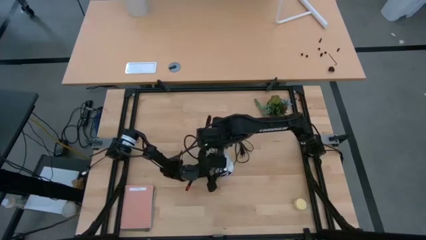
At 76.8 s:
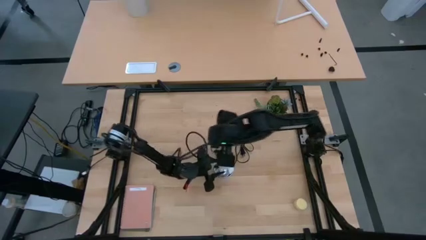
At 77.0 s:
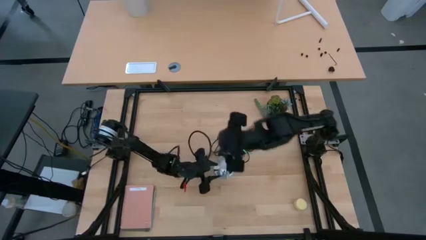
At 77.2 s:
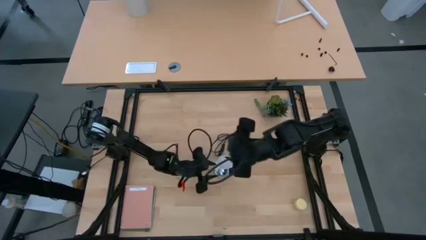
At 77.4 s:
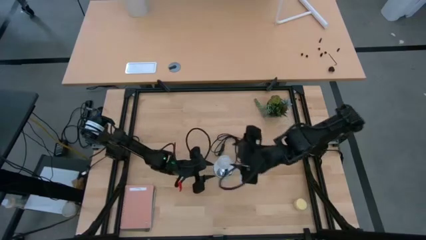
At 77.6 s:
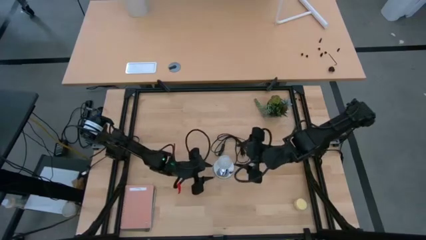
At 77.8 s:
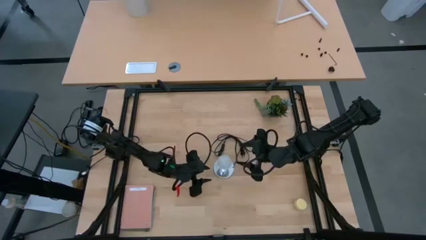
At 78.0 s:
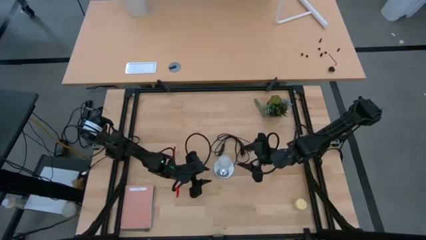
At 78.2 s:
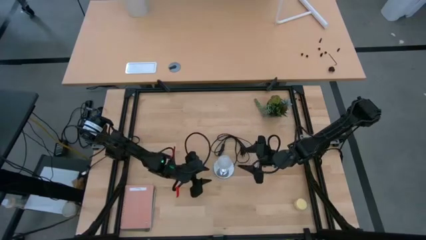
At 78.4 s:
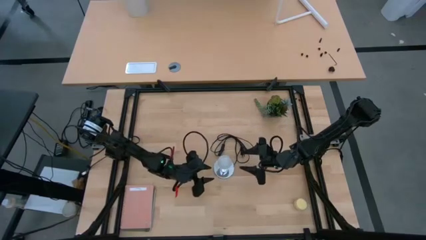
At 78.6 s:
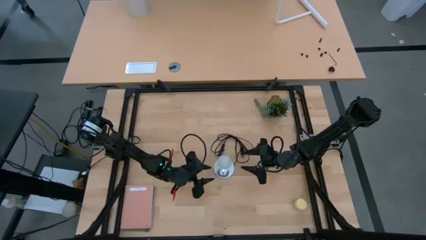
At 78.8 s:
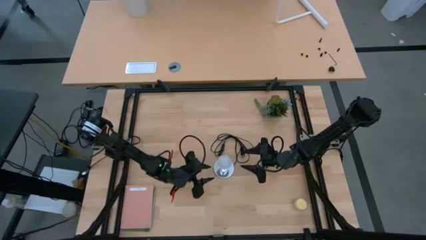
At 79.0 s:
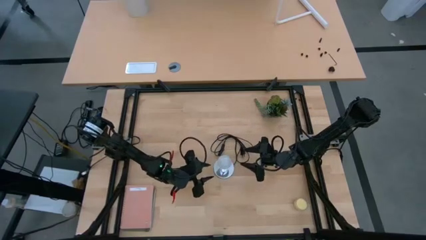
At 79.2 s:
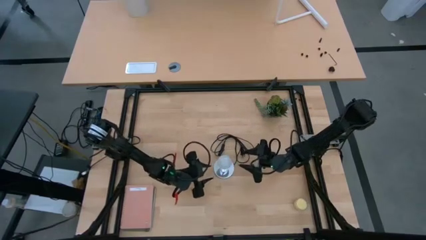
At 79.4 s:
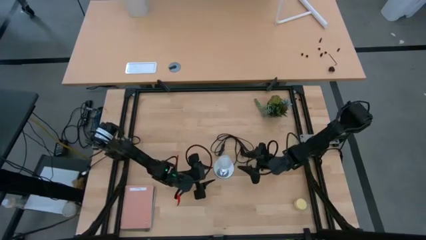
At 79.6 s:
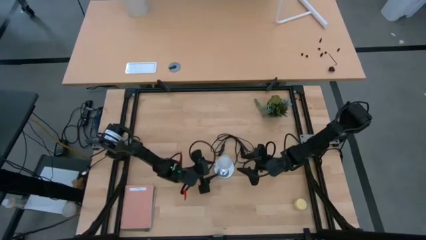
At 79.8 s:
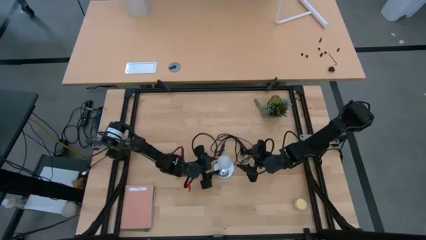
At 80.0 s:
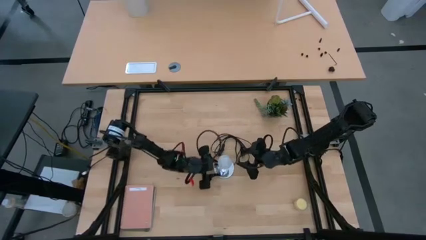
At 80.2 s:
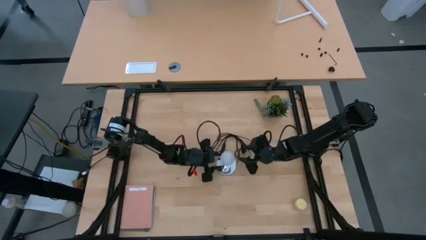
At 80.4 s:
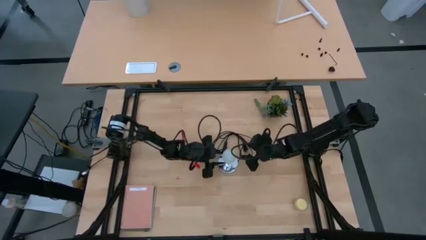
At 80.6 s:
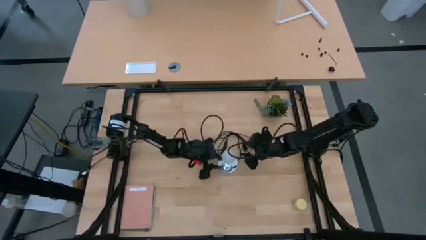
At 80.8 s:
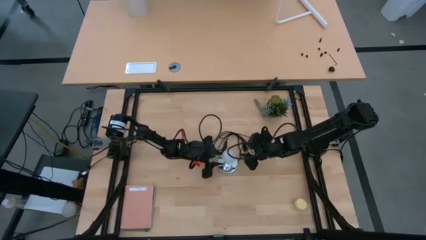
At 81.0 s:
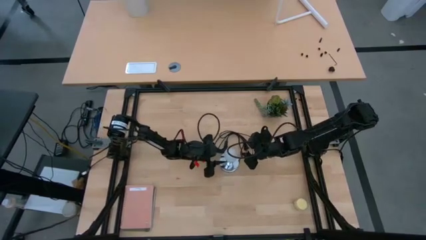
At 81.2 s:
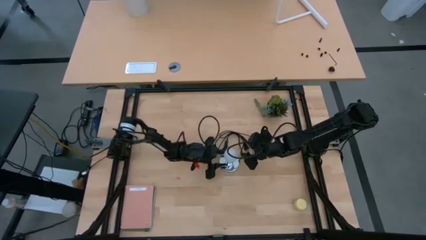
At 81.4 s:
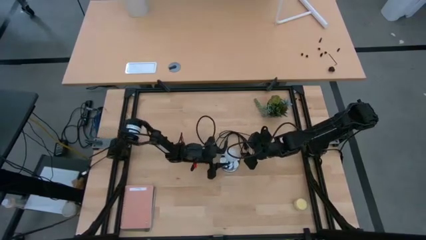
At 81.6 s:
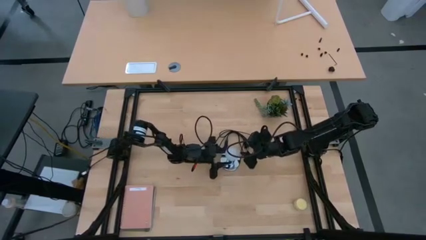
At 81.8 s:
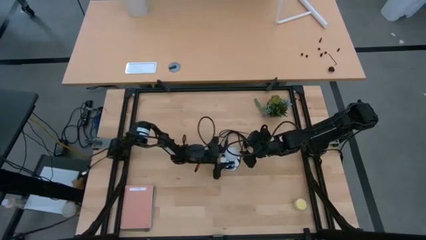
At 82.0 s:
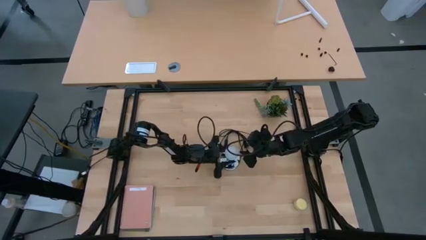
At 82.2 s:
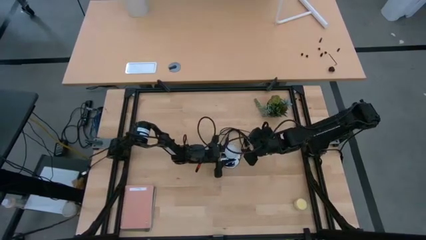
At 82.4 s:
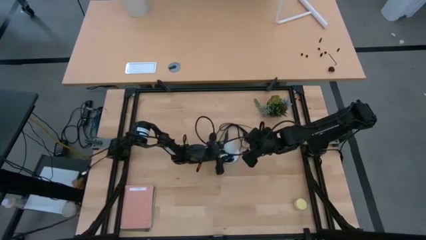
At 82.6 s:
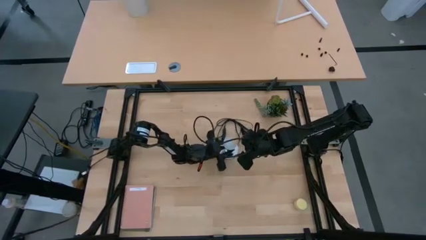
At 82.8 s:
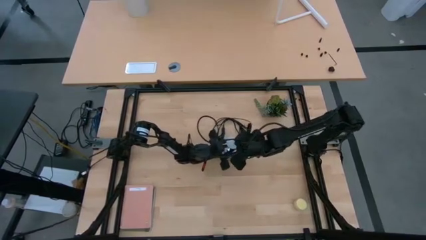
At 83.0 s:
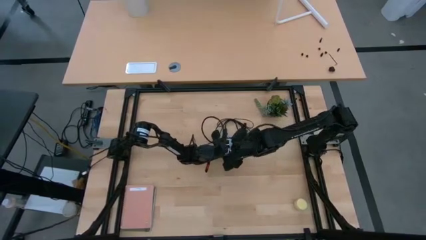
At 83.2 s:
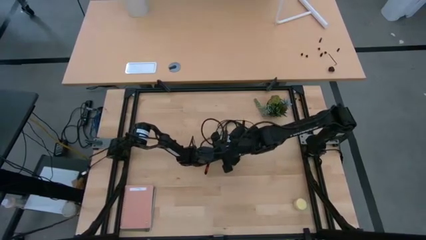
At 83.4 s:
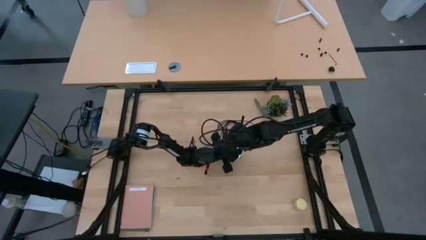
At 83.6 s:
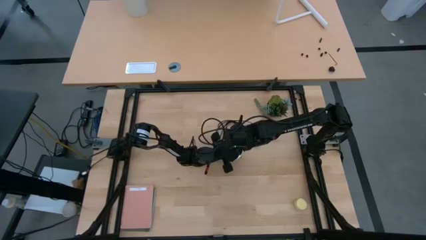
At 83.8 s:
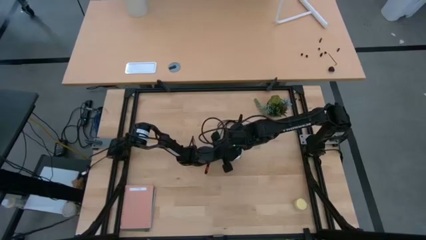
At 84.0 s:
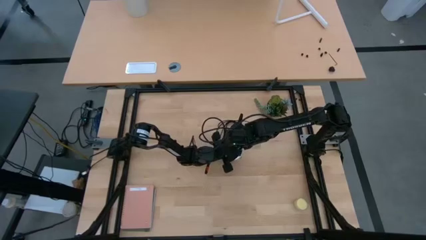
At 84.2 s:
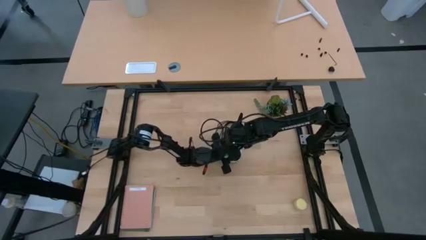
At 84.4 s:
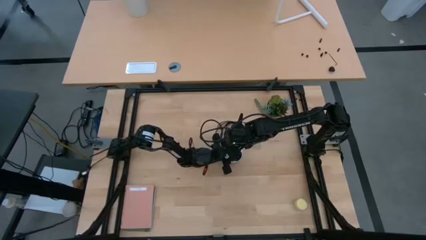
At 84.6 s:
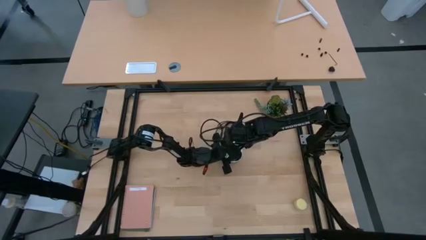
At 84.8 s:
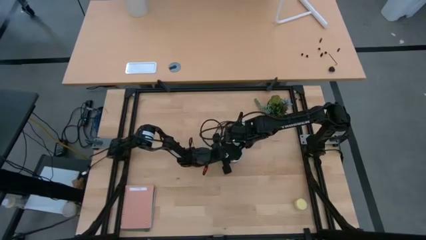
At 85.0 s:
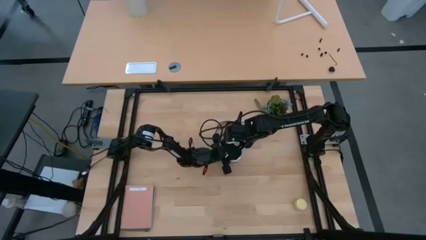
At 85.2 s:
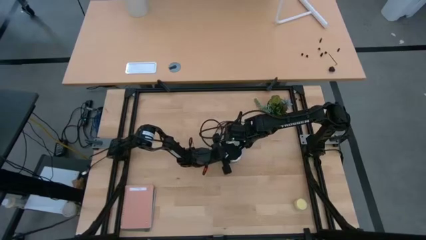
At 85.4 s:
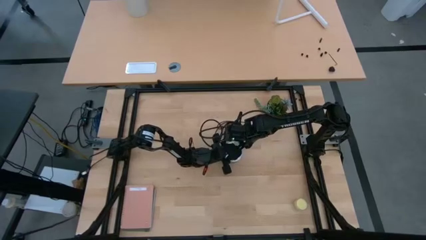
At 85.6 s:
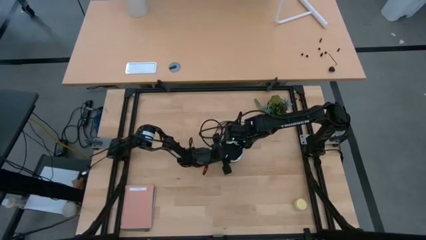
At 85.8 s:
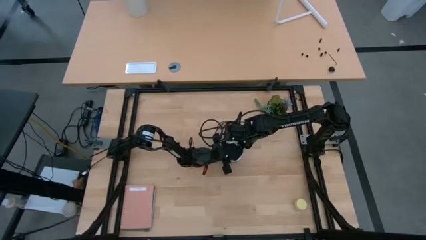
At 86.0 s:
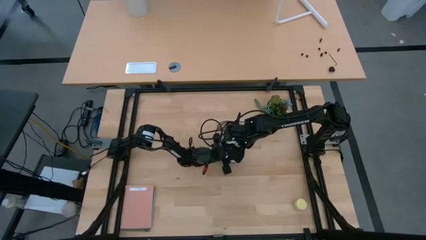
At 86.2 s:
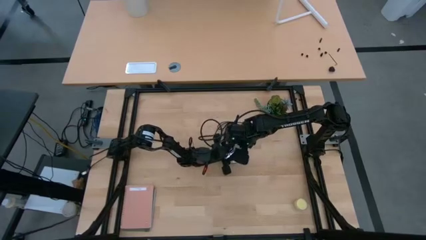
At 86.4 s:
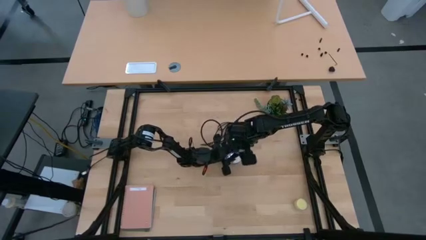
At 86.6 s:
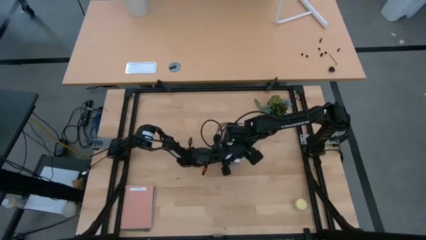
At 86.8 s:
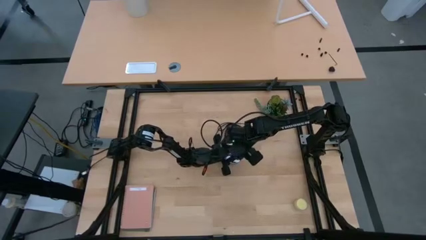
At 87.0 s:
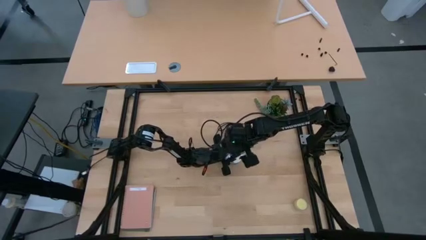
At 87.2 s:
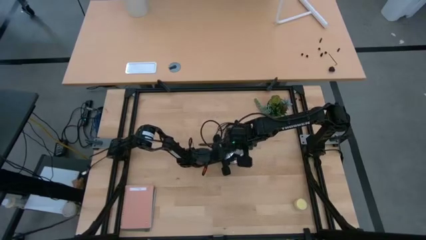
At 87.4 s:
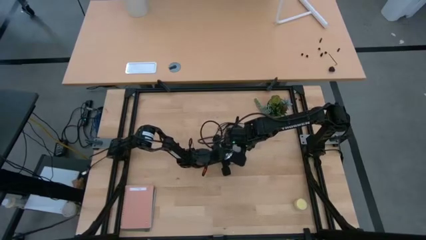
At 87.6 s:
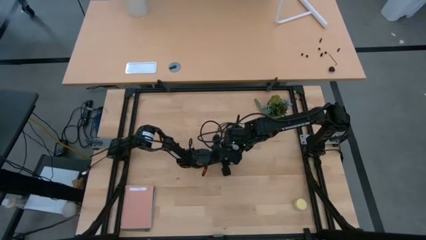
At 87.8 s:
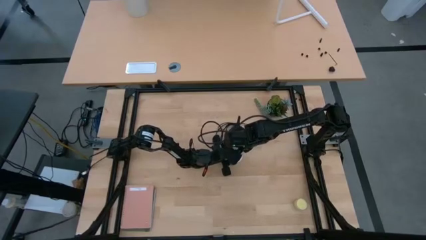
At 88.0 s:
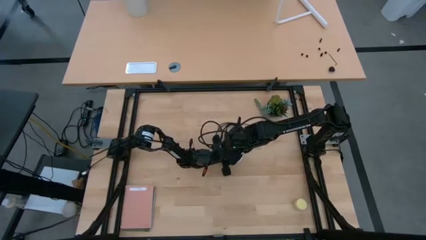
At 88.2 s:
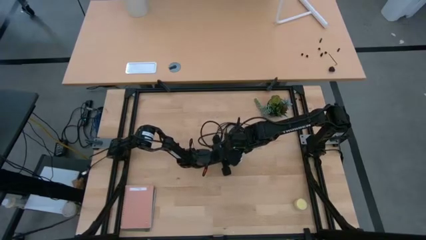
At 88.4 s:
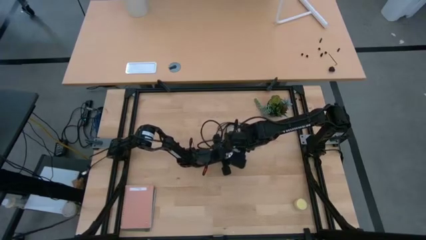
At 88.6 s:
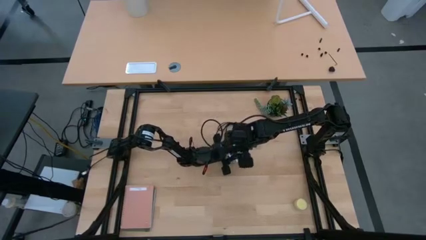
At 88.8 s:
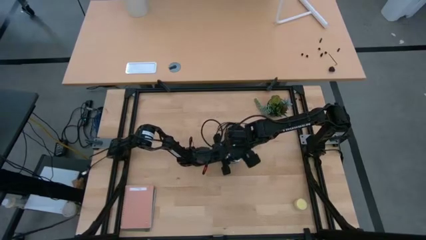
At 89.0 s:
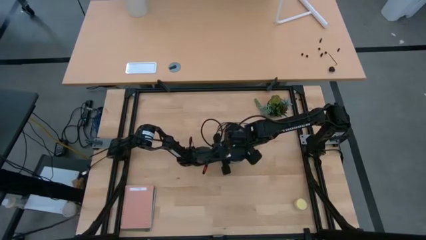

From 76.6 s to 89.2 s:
Task: Screw lightbulb
Remove the lightbulb from the silver lamp
